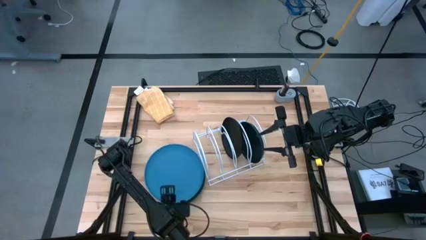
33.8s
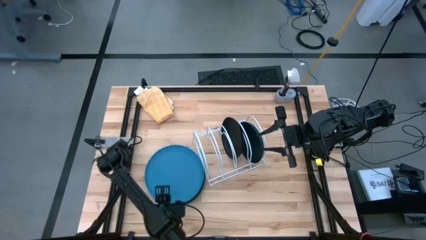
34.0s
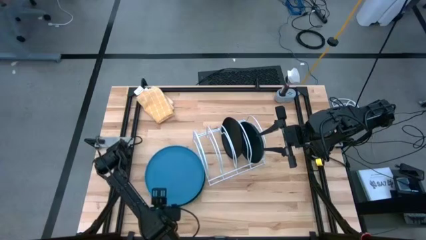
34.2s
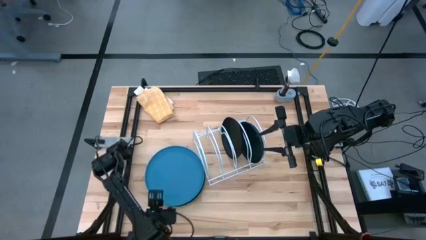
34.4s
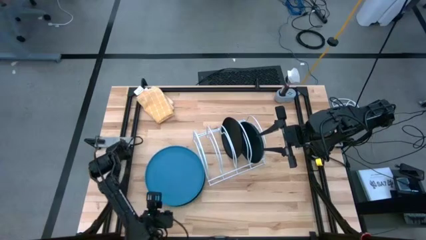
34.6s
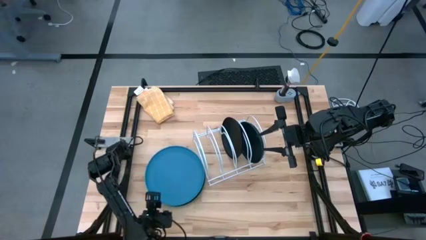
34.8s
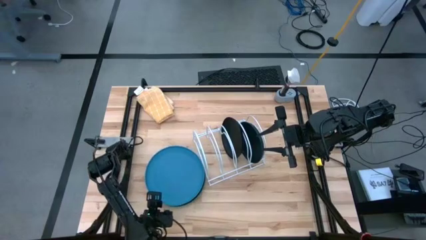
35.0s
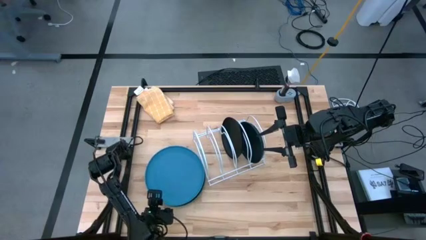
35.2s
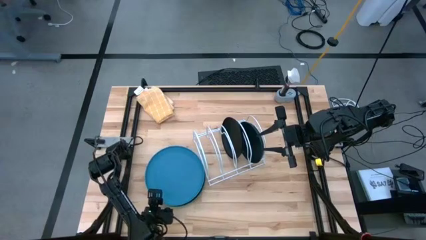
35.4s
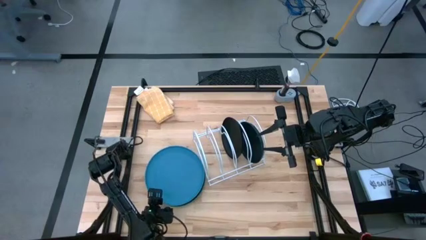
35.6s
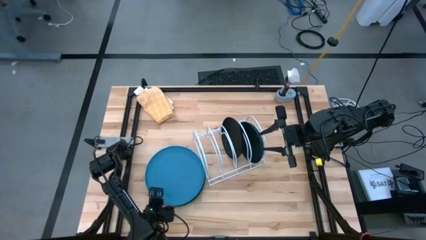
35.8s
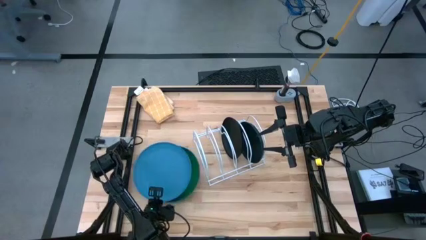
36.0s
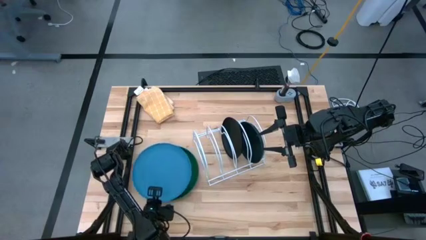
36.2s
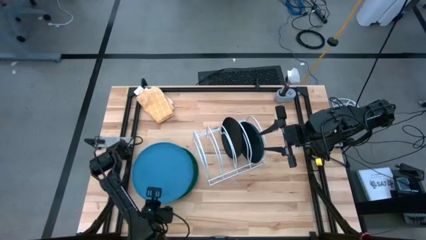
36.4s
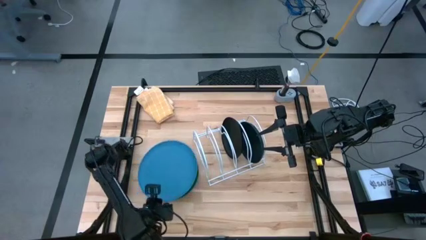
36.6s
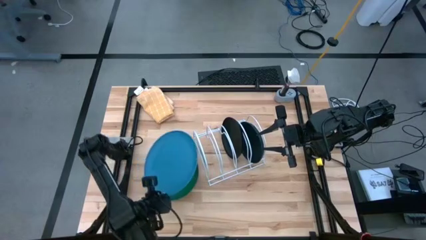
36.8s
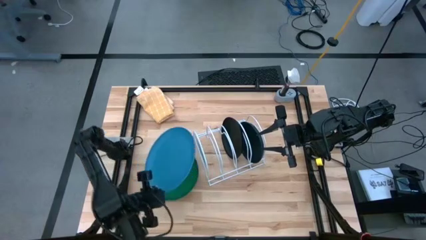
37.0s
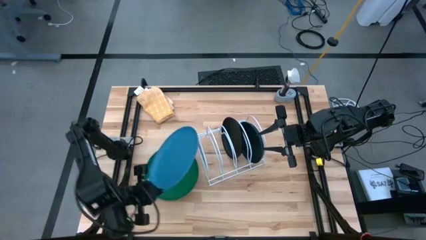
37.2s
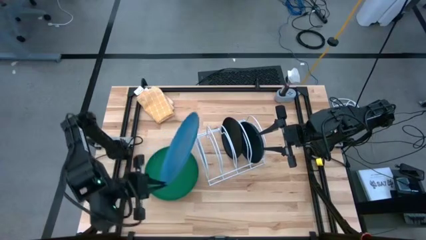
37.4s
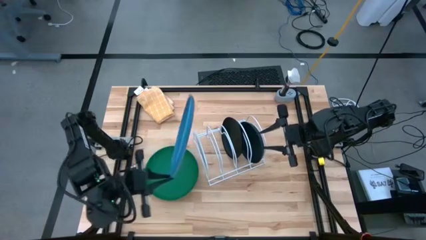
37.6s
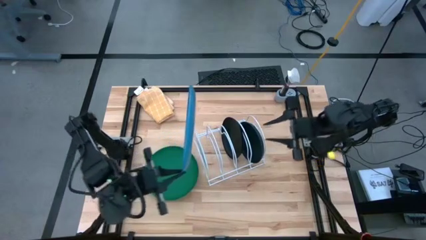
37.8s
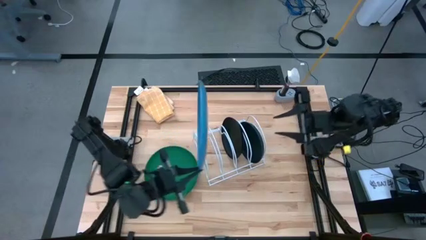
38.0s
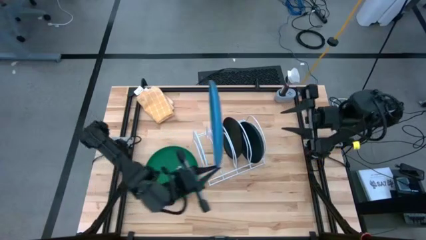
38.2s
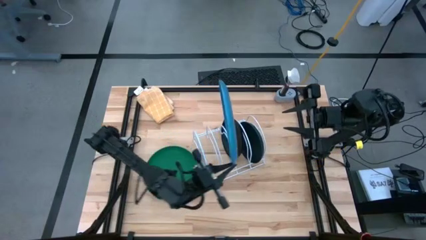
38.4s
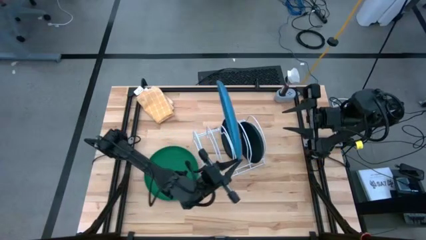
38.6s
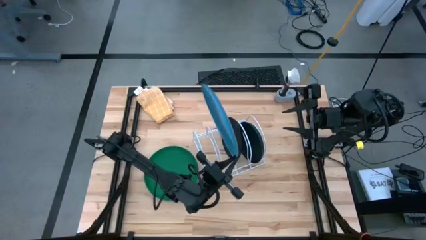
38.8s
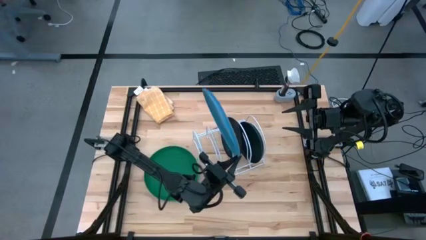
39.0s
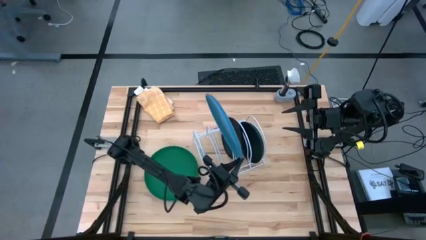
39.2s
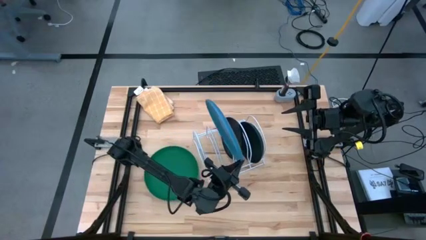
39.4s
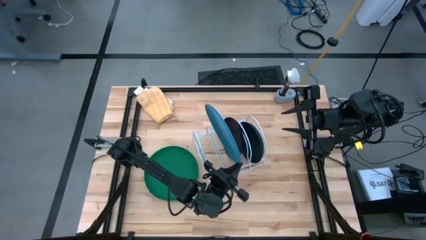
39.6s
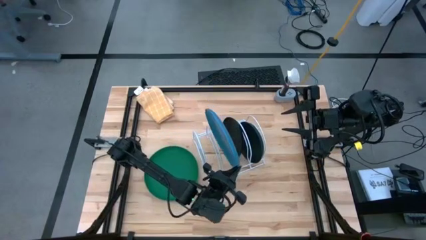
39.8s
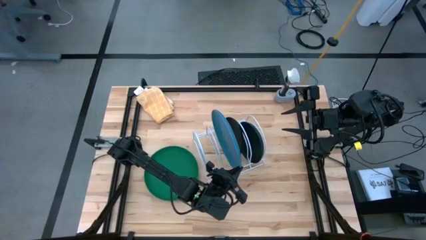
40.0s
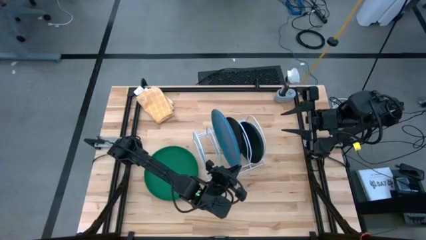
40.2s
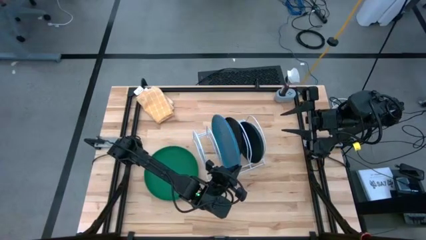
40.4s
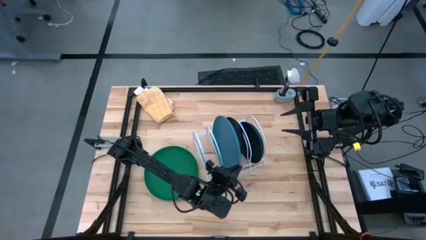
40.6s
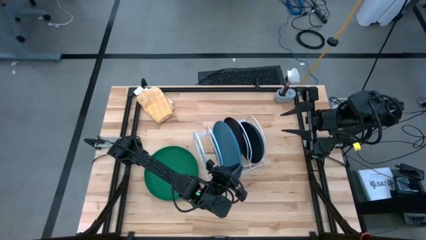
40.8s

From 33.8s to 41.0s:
Task: Sort dishes
Put the blue plate into the dish rack

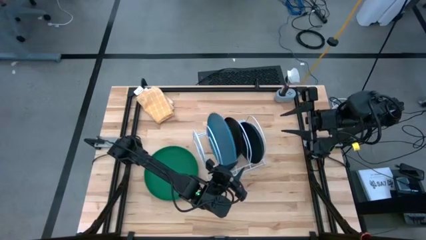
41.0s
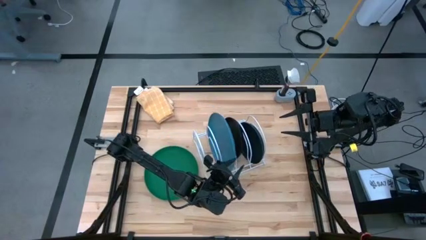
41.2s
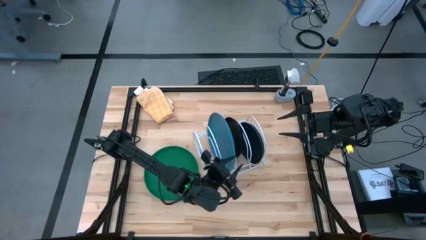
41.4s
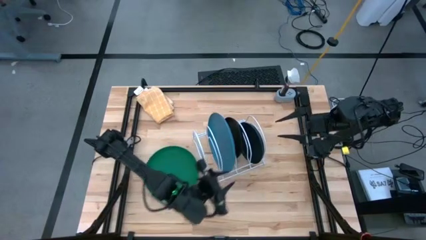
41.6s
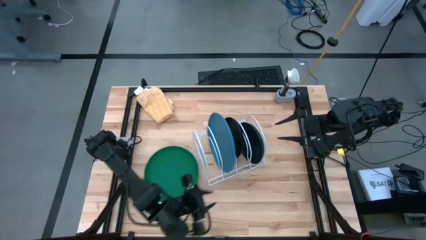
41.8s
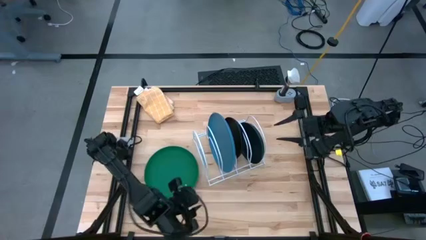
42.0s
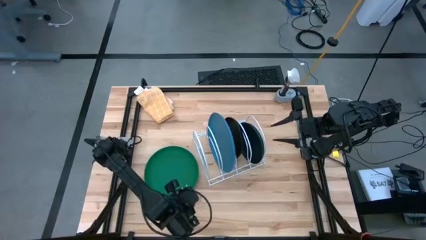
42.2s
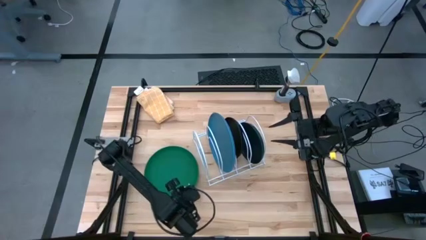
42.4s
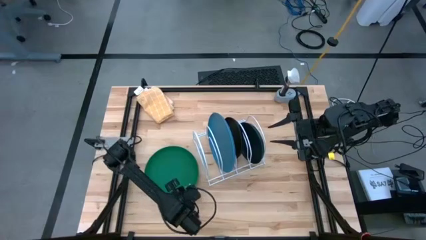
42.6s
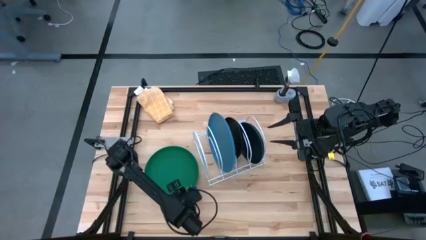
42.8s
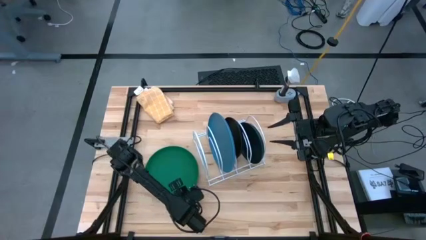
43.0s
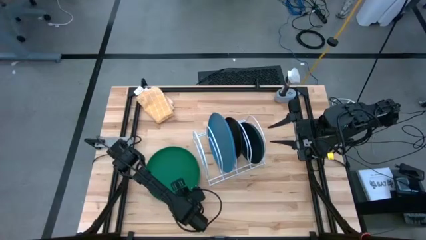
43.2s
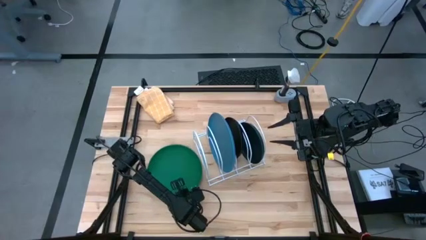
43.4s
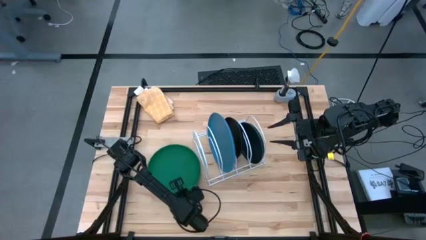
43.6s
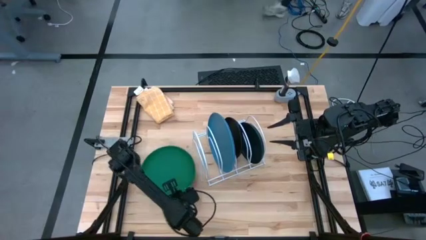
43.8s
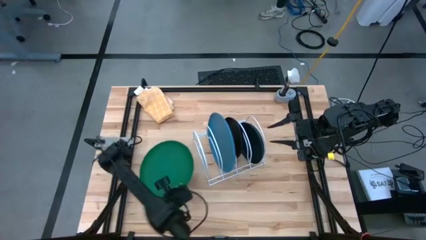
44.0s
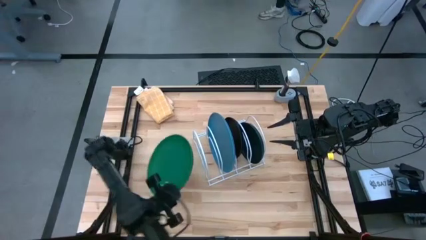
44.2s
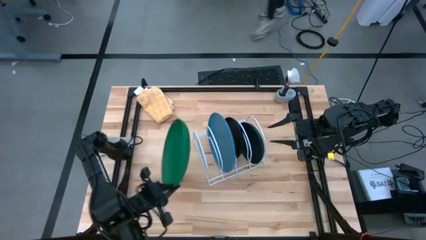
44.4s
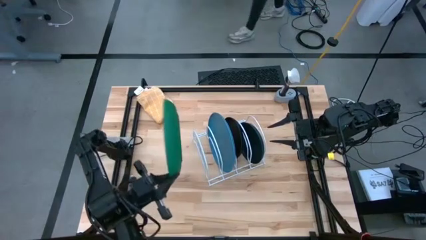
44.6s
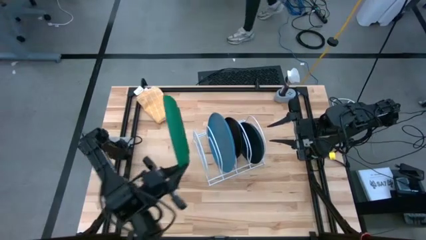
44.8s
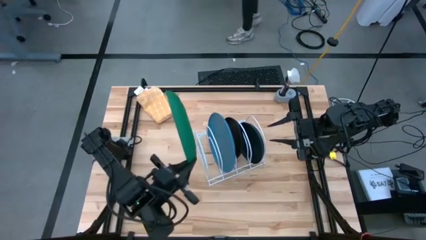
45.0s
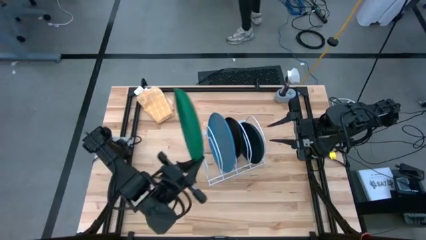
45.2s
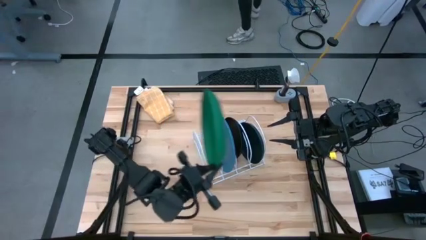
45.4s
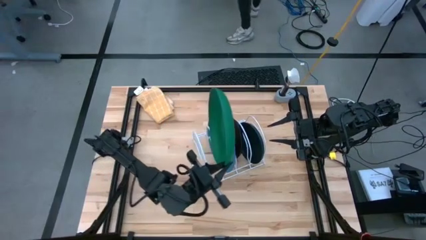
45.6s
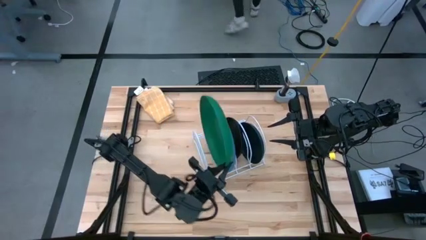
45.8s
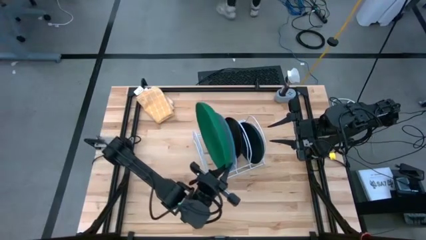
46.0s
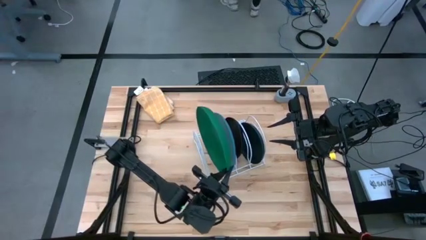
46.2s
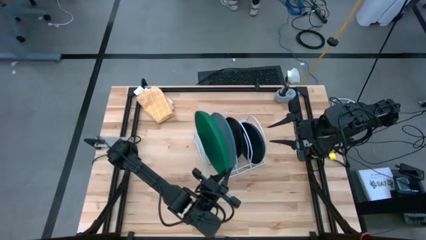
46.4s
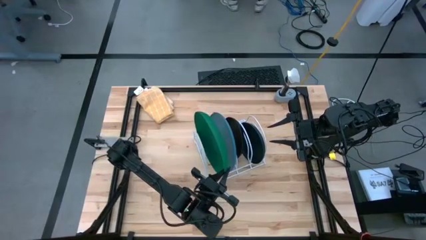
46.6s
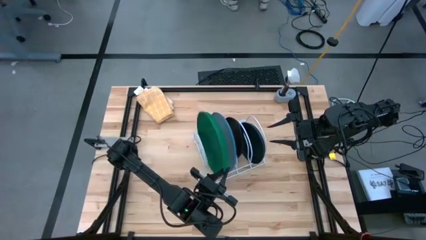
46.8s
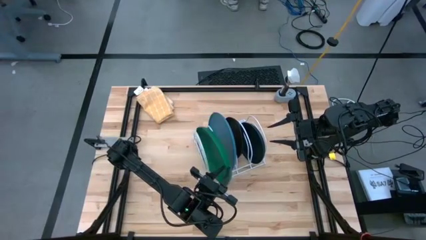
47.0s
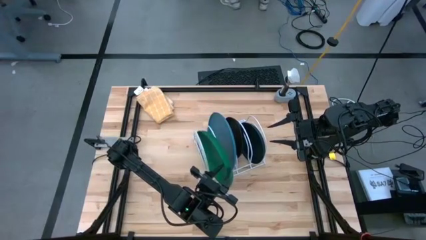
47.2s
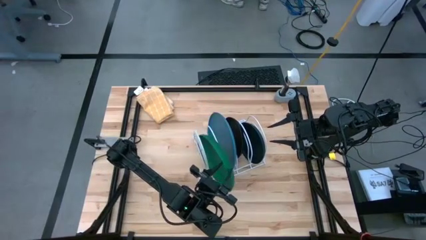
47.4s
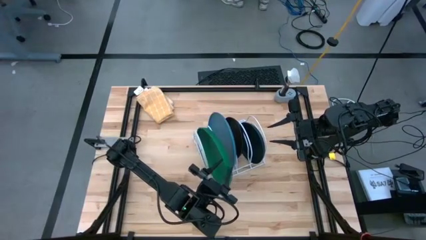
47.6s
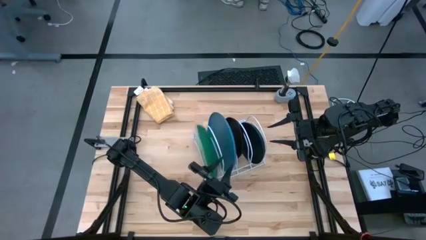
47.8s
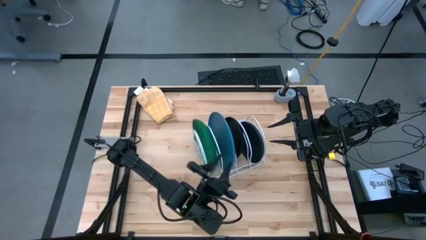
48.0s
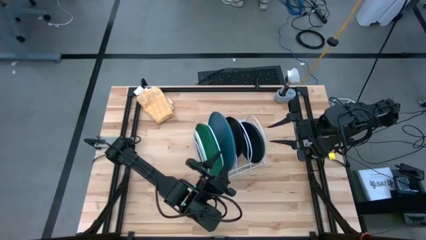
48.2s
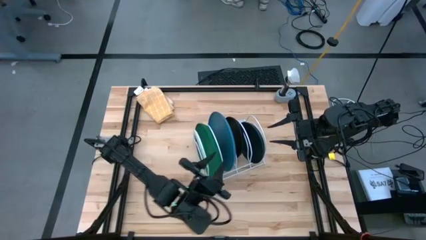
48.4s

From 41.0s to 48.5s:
Put the green plate into the dish rack

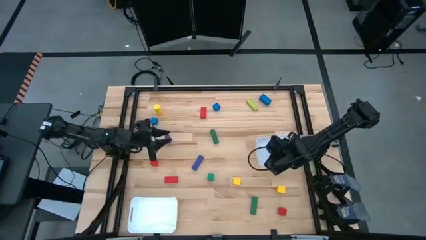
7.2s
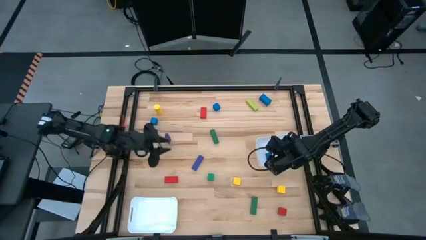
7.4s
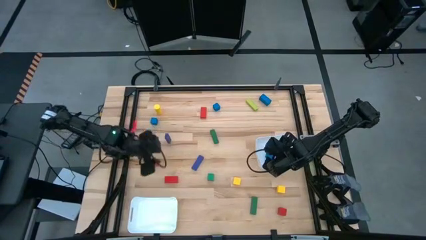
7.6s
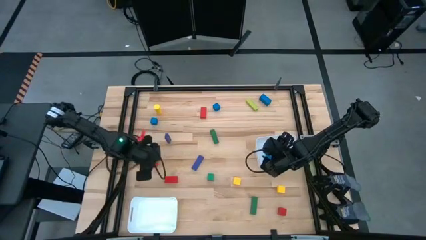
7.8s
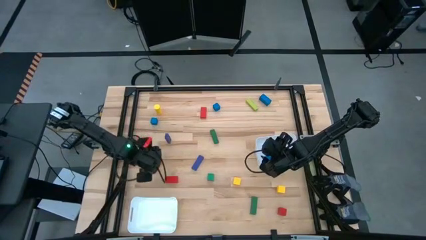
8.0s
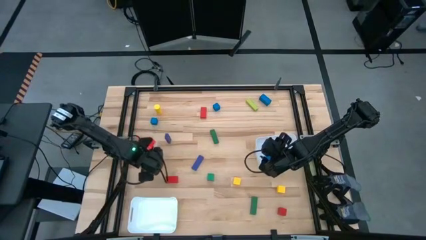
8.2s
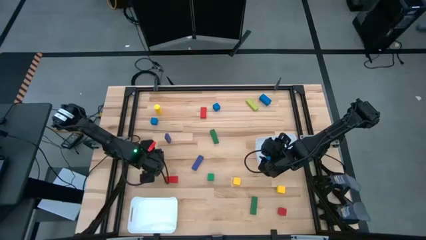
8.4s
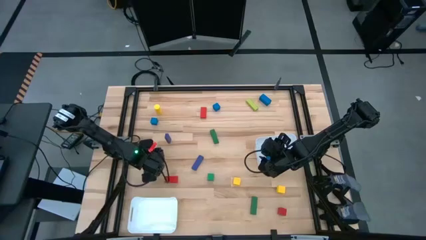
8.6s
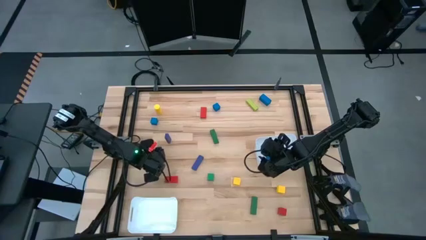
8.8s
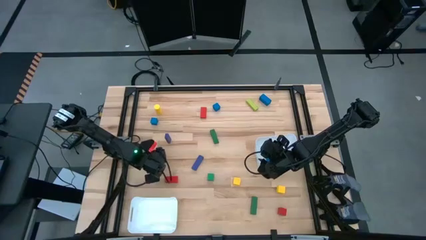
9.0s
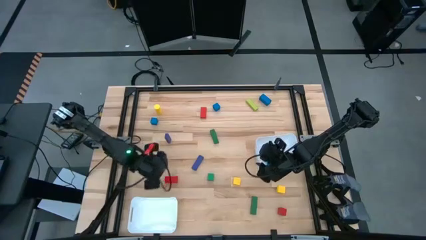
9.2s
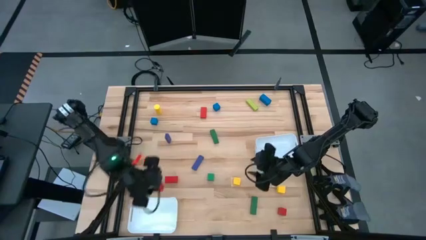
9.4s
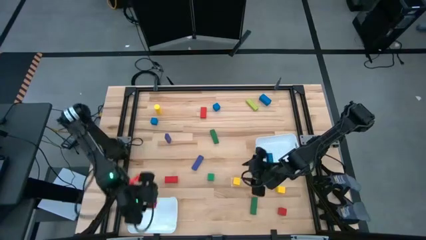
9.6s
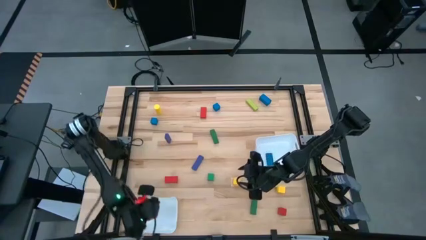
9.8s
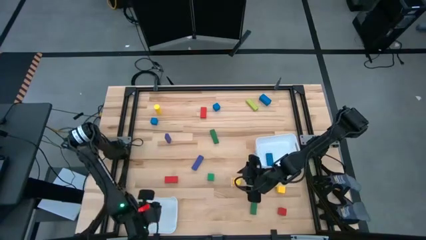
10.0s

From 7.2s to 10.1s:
Task: Sort blocks by size
Put the red square block into the bottom white bin
